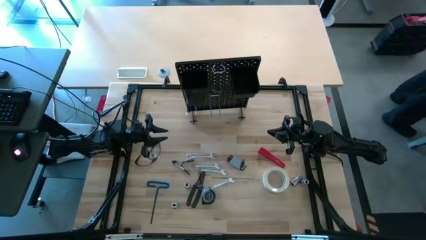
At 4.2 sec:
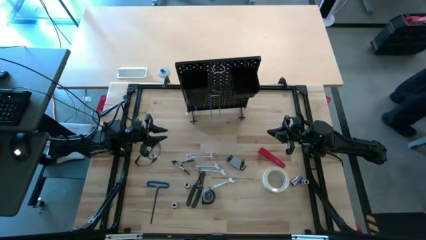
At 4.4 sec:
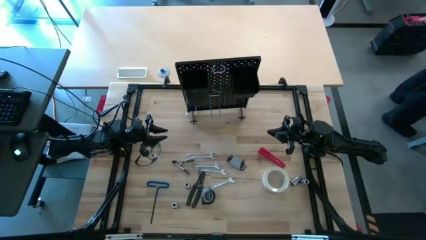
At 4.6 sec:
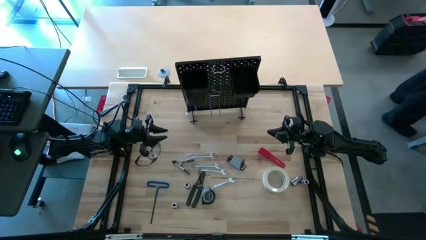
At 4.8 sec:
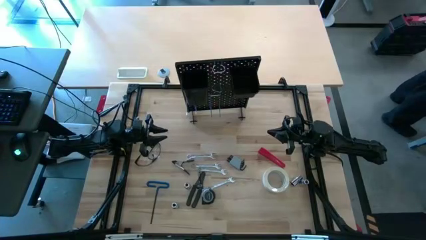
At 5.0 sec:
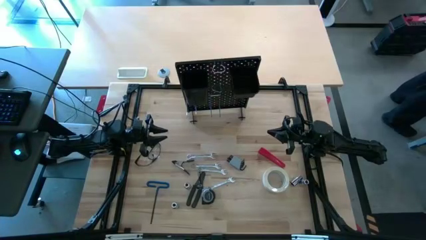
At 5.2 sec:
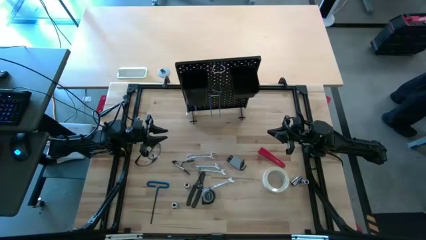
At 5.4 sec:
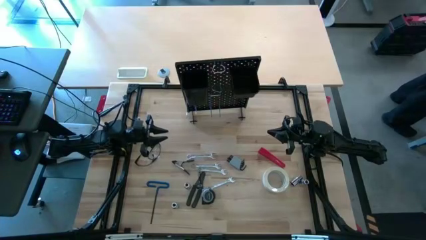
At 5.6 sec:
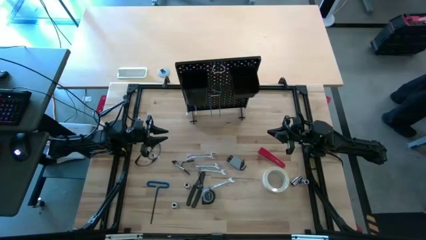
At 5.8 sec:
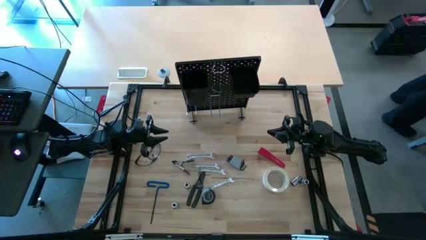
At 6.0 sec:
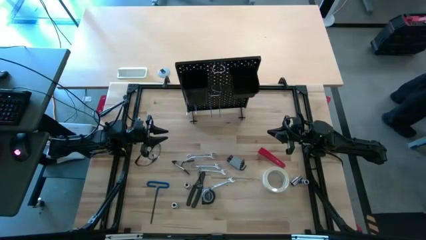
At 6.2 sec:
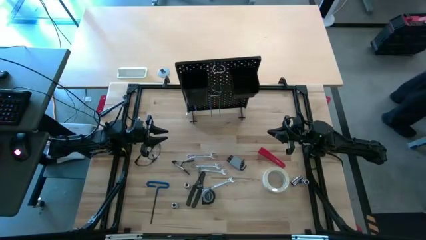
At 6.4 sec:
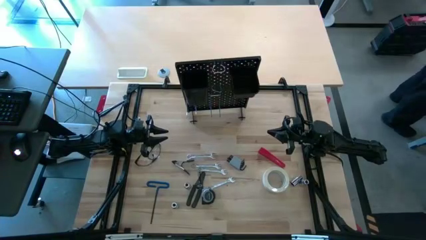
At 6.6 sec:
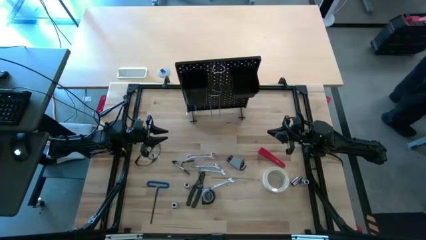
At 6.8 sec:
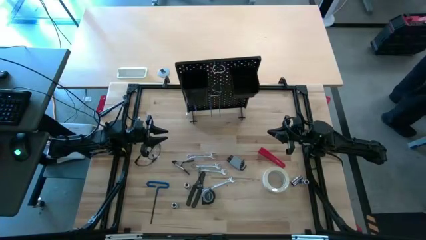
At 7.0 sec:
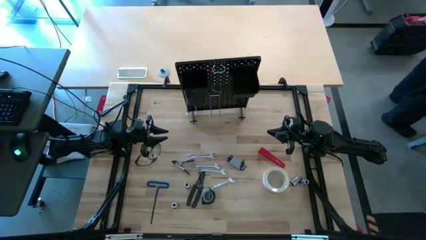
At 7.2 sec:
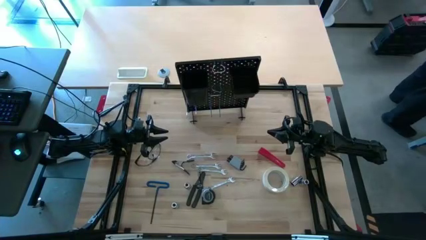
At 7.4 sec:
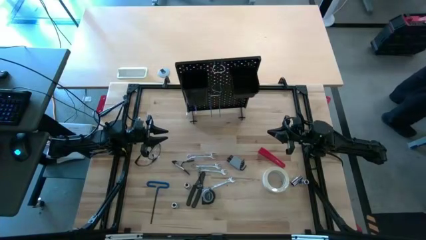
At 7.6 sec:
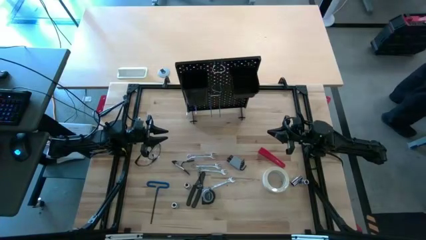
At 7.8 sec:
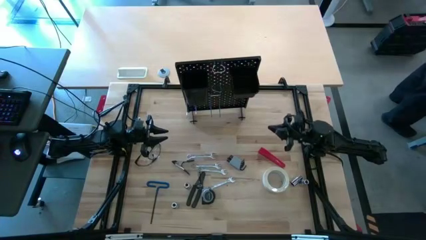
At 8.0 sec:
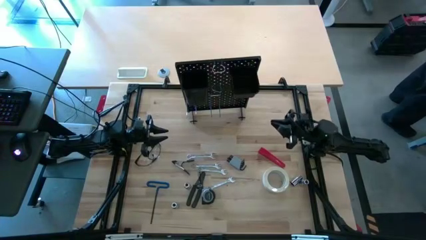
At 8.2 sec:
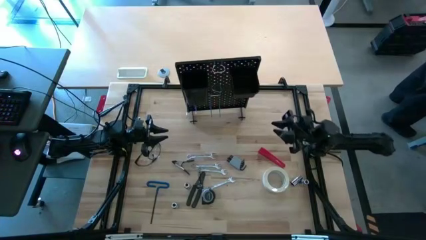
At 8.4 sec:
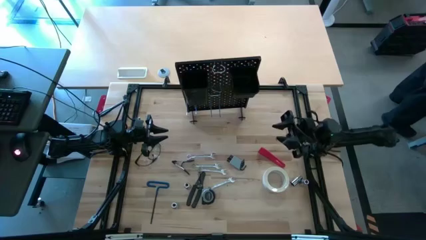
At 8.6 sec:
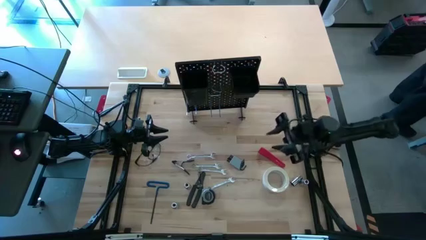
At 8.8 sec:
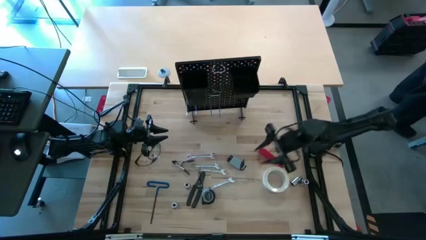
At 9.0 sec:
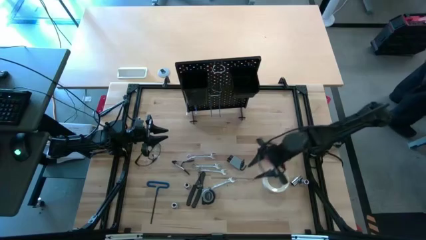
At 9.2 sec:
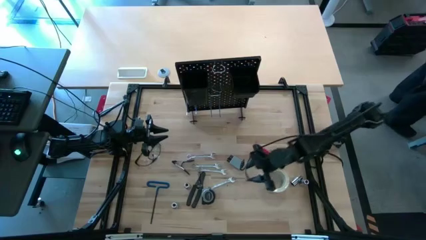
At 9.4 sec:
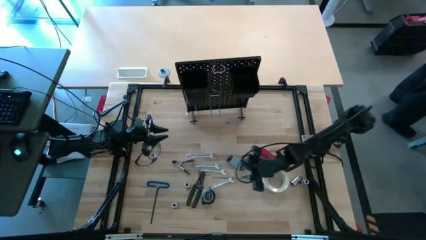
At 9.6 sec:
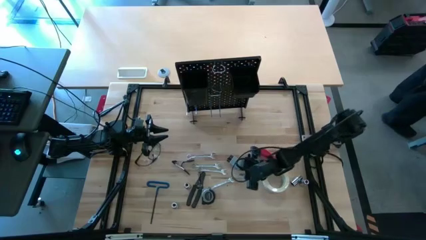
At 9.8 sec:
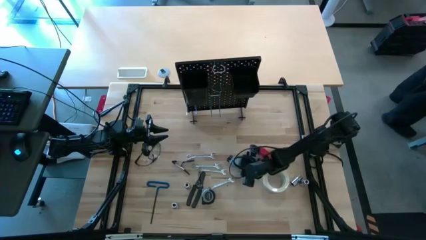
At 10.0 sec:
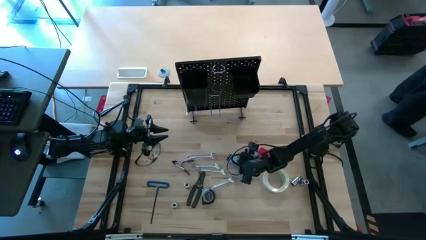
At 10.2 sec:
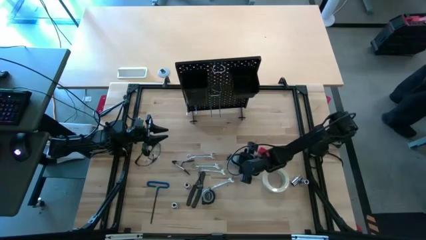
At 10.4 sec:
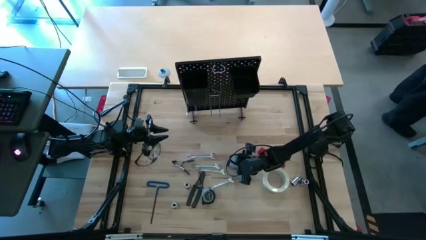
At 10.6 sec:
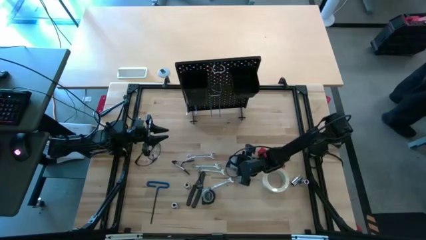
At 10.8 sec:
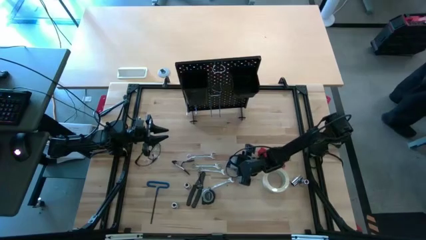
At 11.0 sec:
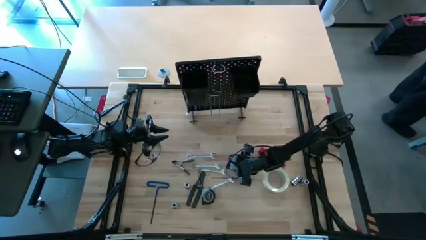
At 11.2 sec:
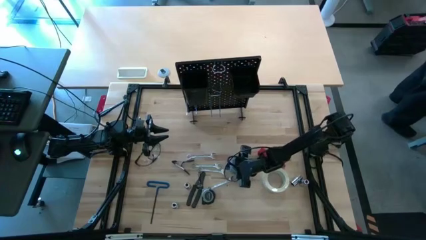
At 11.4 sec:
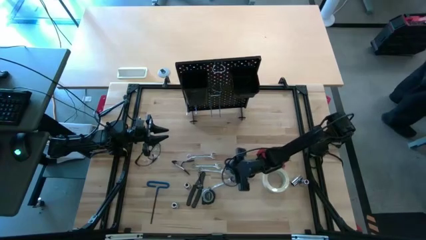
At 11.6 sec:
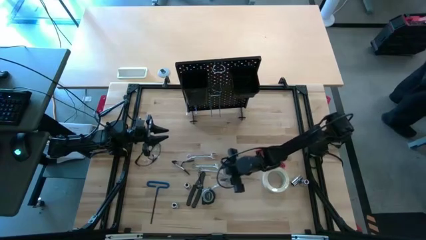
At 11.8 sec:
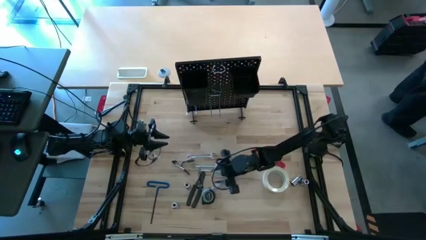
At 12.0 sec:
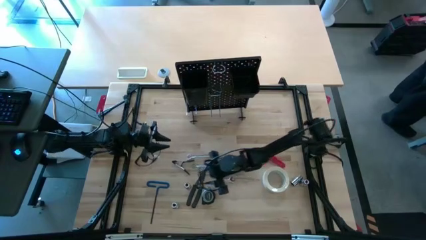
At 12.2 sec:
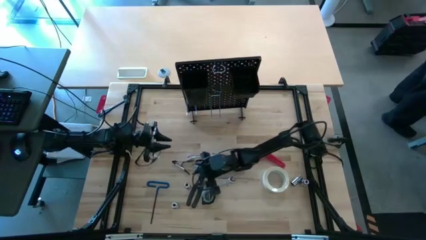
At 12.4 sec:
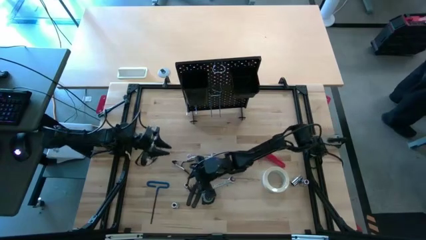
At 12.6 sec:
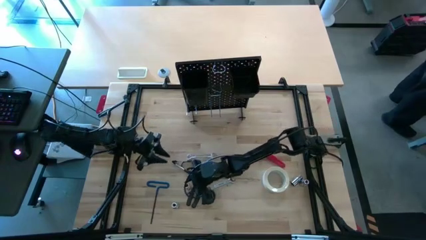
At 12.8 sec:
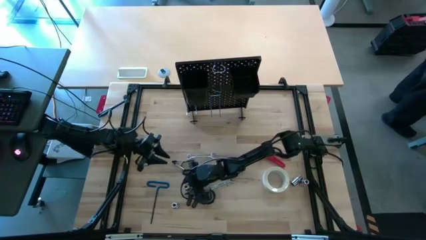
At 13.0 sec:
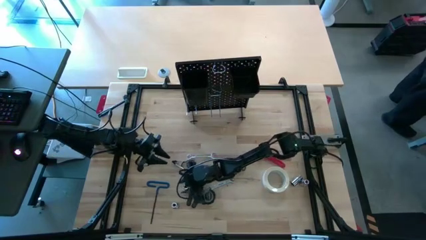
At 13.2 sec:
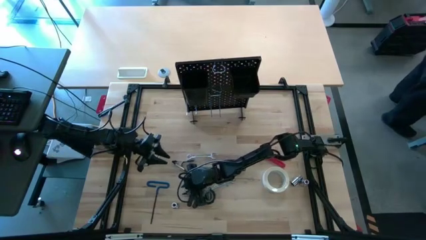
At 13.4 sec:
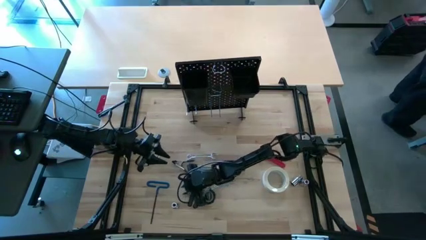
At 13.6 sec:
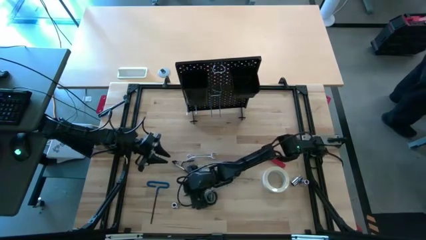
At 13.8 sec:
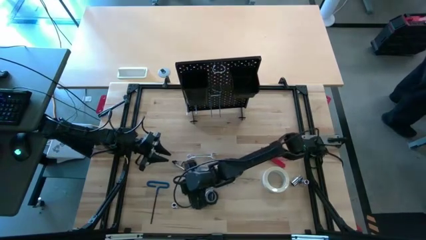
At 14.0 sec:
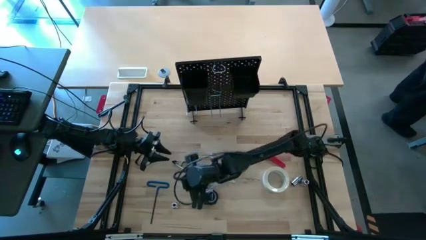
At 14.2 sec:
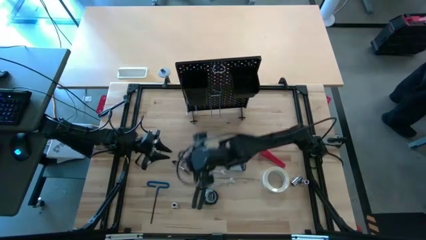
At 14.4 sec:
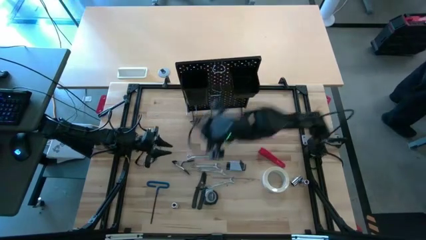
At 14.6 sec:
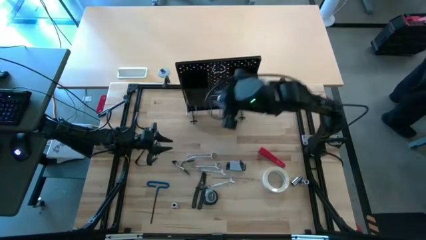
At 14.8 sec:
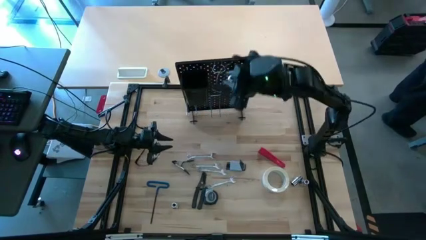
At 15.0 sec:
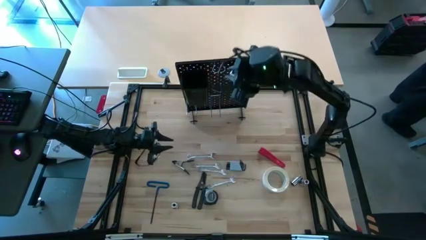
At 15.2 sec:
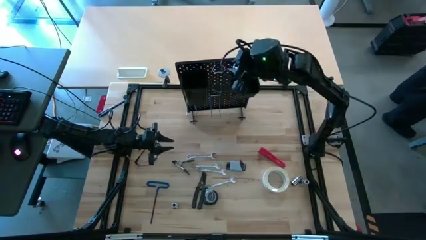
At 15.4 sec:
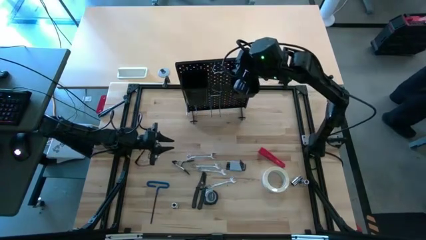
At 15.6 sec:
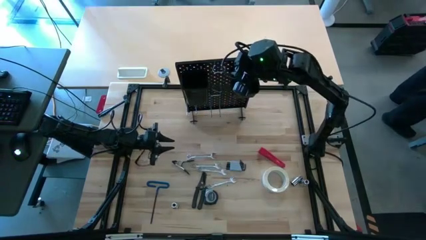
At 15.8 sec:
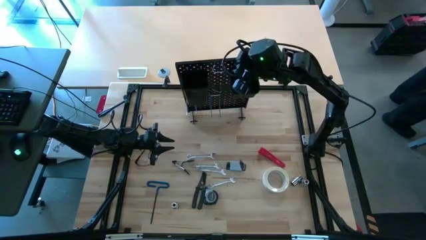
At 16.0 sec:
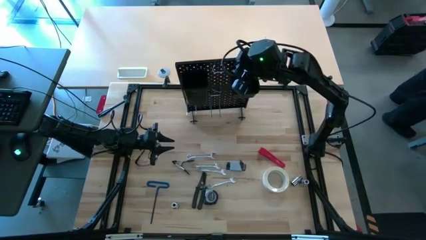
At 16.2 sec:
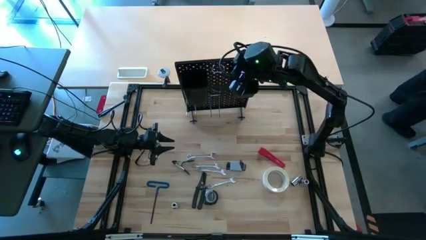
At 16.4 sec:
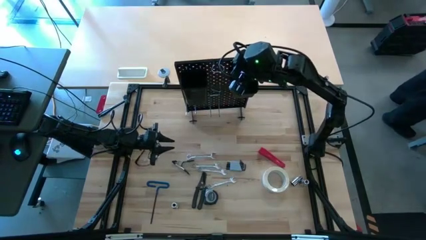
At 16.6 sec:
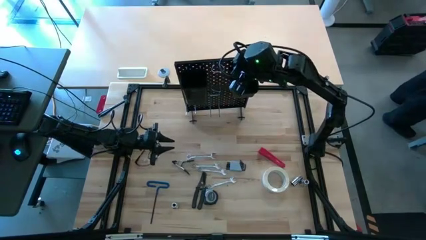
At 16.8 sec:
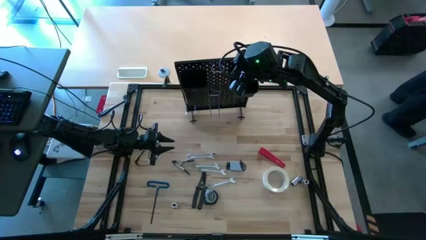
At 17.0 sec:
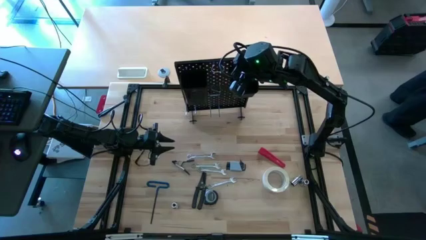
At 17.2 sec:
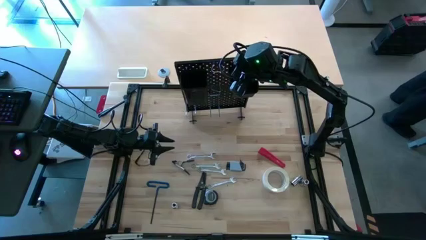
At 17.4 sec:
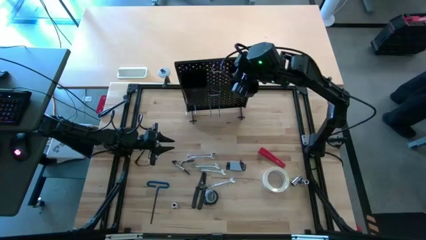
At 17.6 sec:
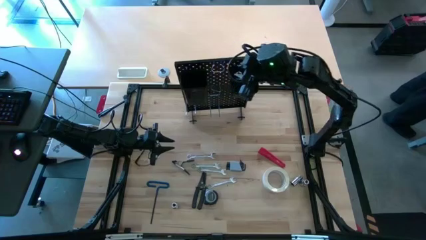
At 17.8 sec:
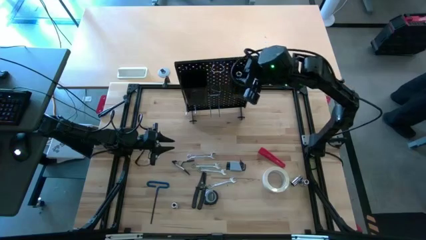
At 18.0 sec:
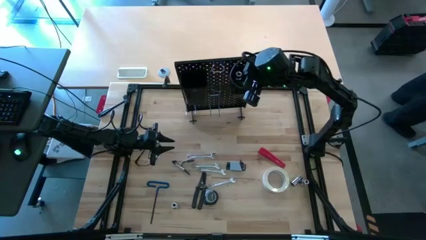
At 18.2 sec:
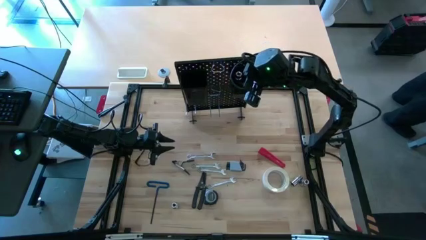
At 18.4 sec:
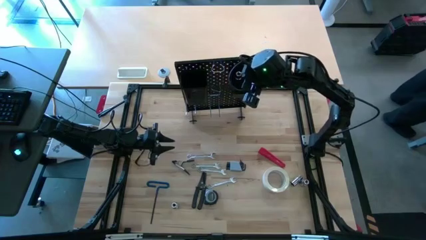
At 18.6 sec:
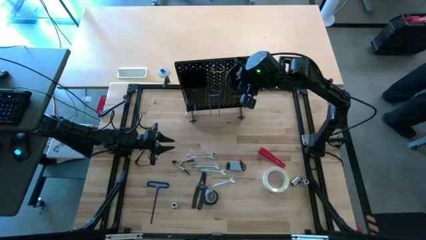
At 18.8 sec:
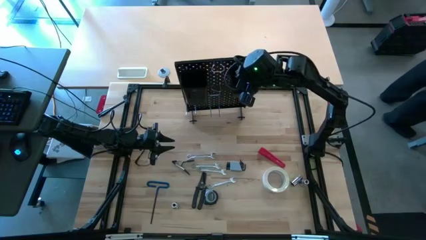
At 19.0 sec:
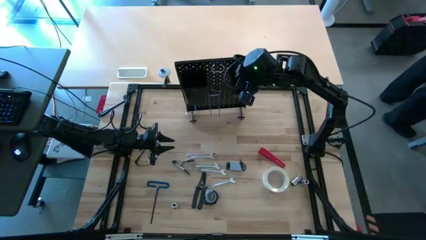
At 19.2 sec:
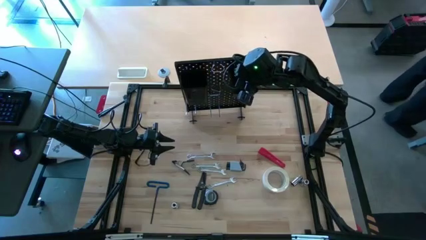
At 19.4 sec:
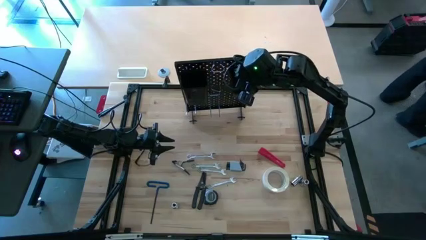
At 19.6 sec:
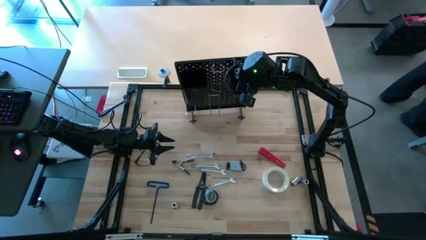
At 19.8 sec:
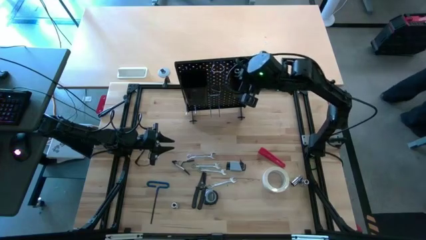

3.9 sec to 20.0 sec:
Task: Hang tools onto peg board
Put the top left silver socket into the black bin on the pegboard
